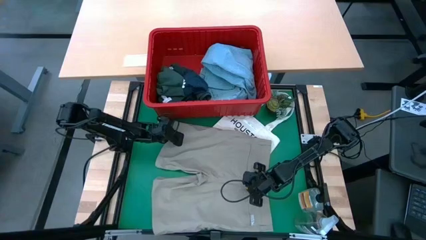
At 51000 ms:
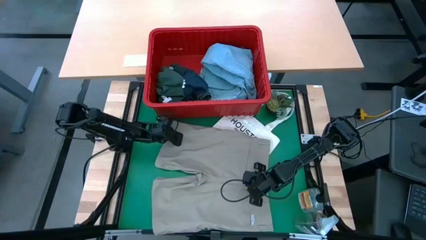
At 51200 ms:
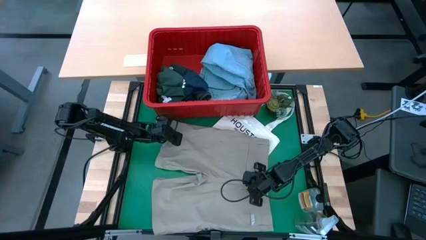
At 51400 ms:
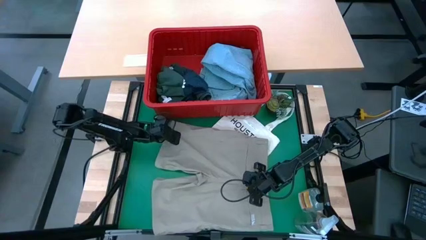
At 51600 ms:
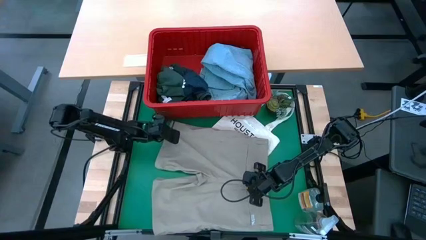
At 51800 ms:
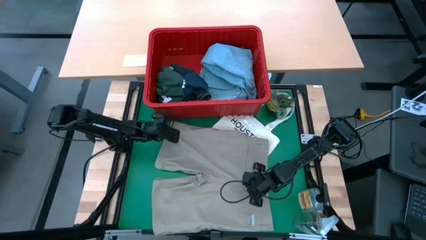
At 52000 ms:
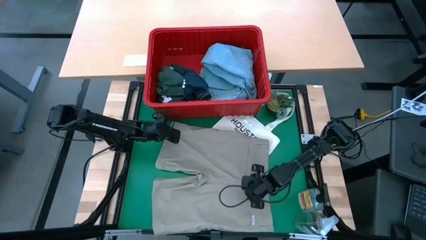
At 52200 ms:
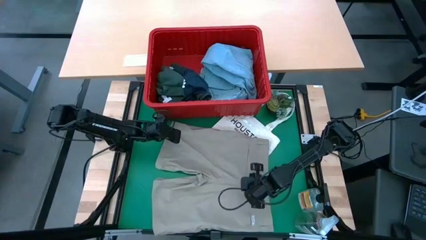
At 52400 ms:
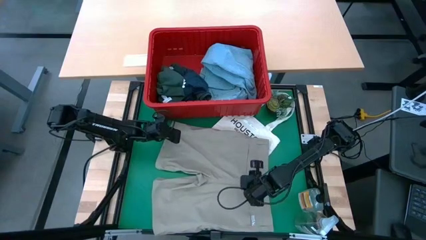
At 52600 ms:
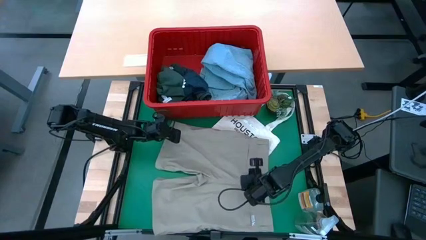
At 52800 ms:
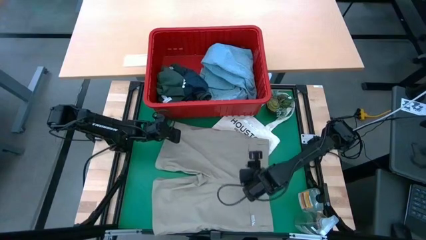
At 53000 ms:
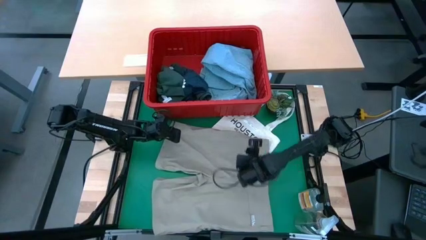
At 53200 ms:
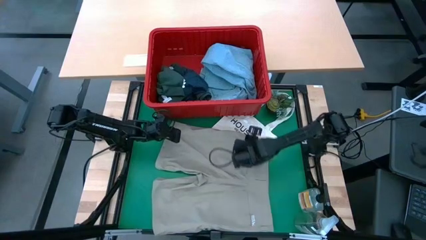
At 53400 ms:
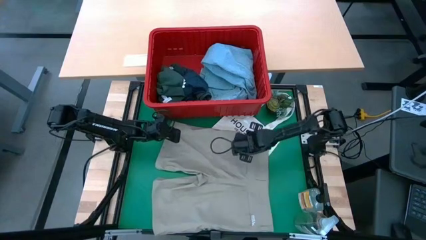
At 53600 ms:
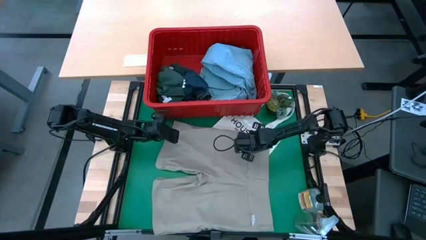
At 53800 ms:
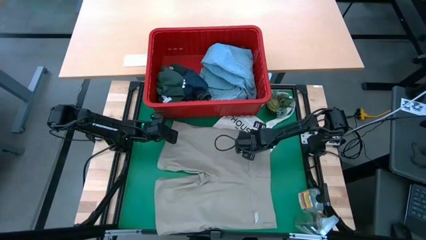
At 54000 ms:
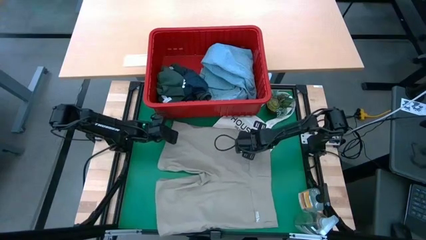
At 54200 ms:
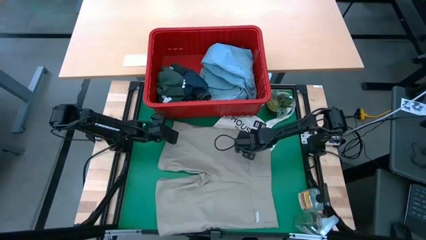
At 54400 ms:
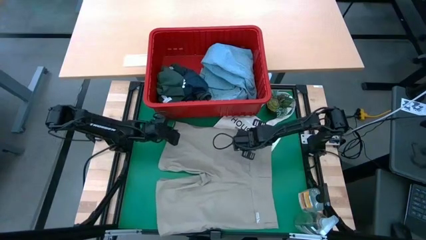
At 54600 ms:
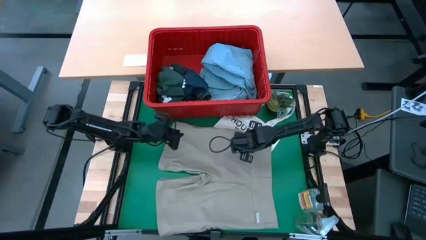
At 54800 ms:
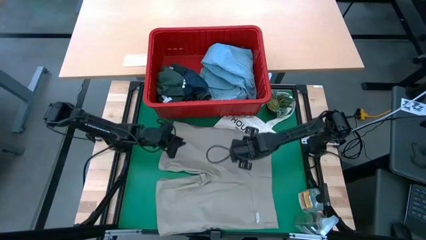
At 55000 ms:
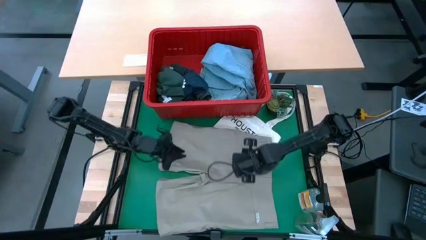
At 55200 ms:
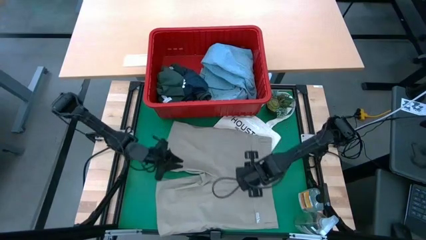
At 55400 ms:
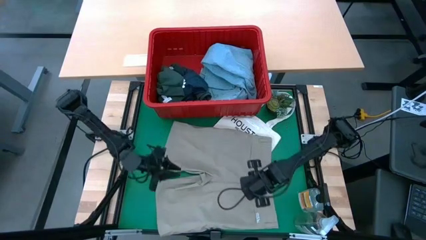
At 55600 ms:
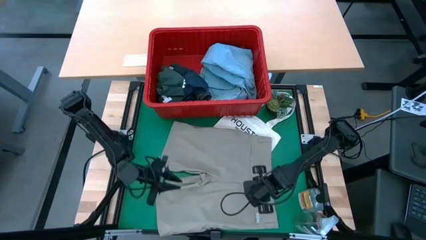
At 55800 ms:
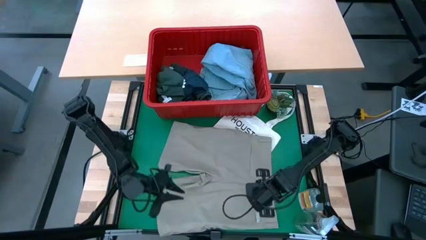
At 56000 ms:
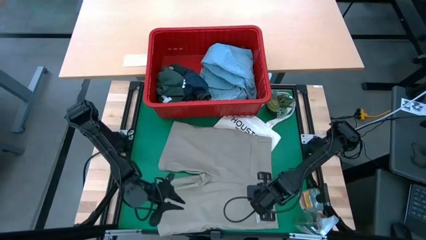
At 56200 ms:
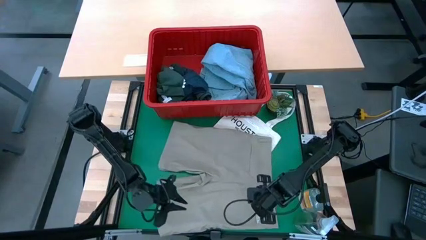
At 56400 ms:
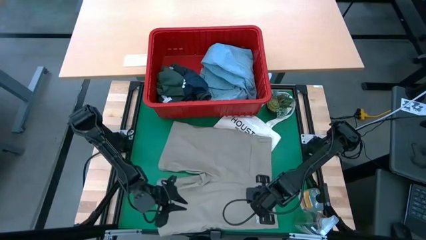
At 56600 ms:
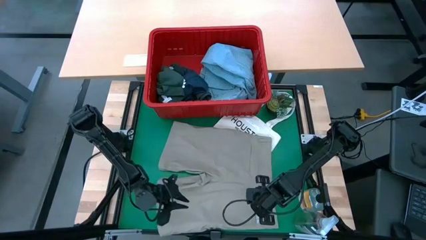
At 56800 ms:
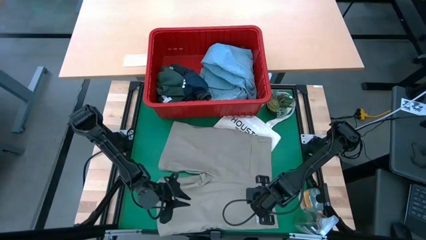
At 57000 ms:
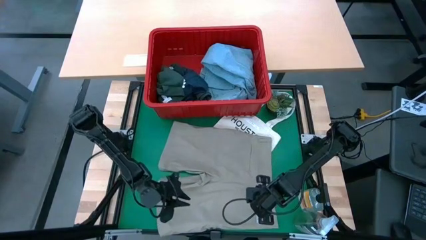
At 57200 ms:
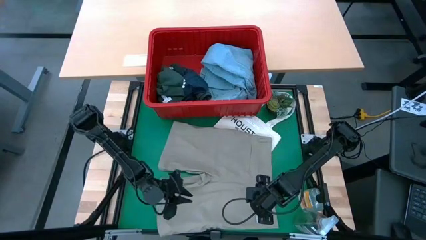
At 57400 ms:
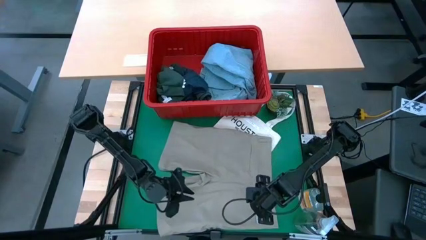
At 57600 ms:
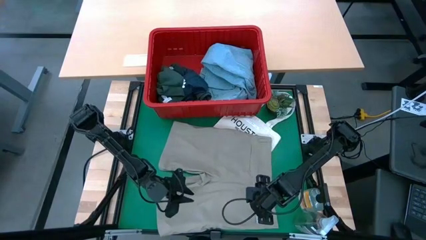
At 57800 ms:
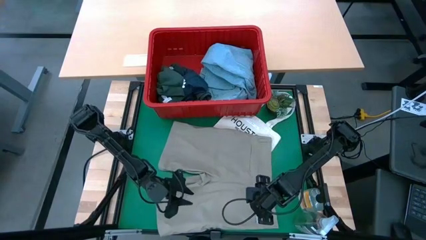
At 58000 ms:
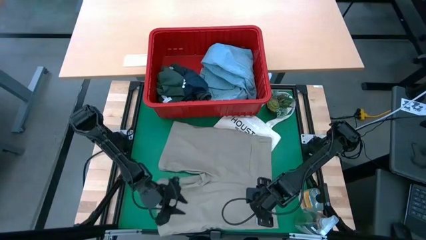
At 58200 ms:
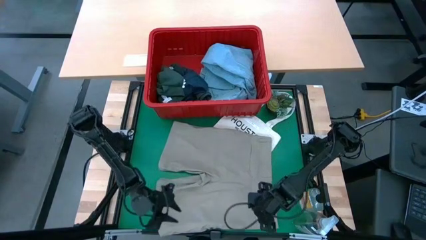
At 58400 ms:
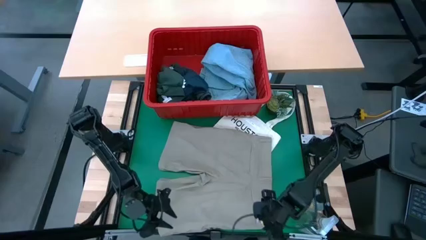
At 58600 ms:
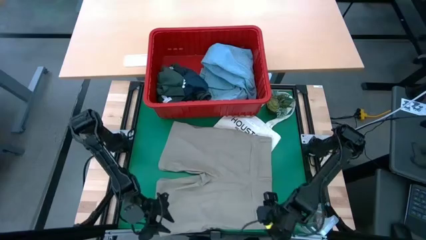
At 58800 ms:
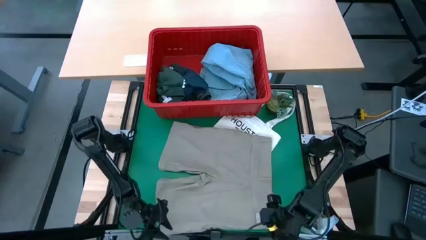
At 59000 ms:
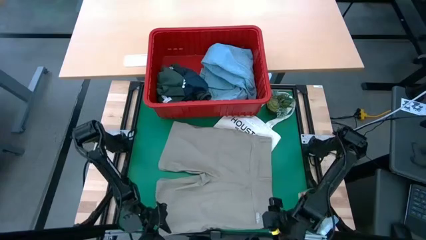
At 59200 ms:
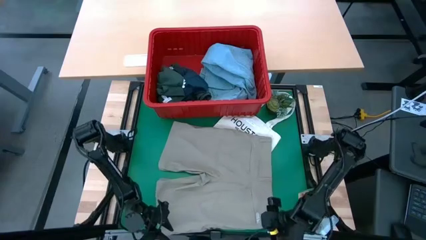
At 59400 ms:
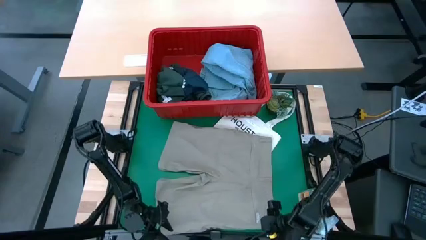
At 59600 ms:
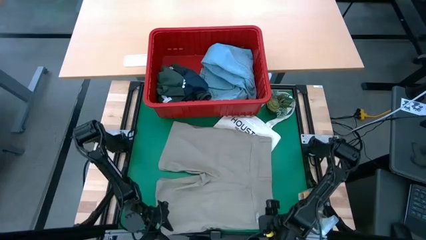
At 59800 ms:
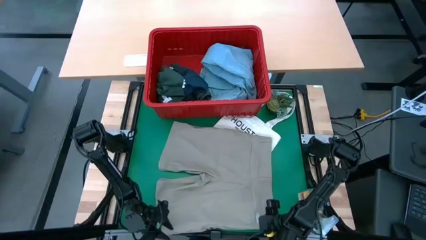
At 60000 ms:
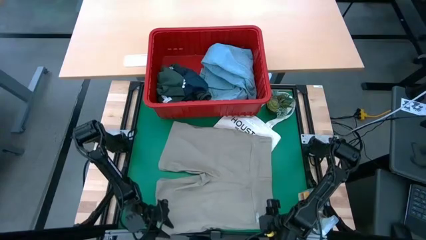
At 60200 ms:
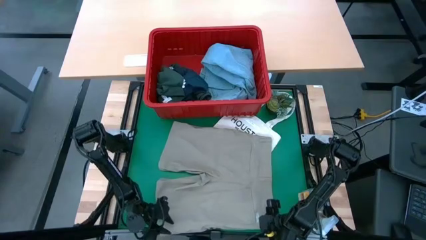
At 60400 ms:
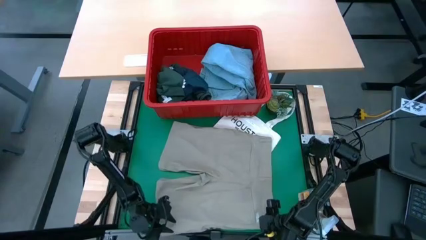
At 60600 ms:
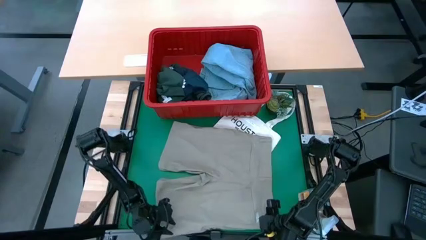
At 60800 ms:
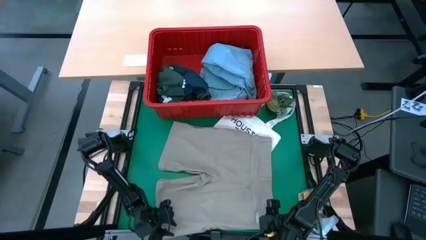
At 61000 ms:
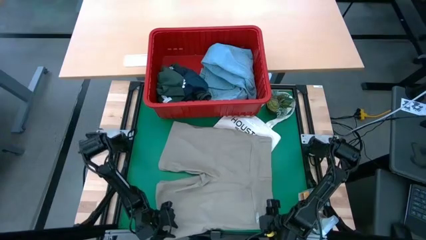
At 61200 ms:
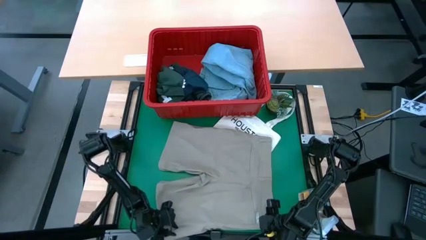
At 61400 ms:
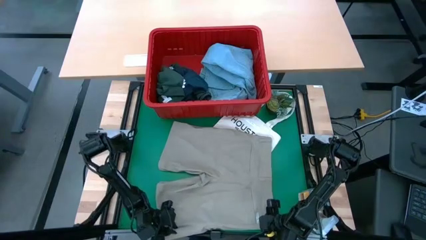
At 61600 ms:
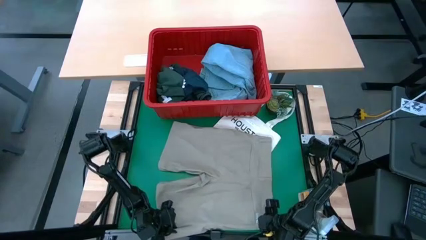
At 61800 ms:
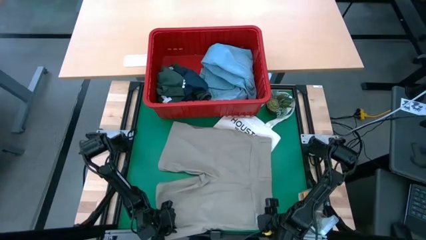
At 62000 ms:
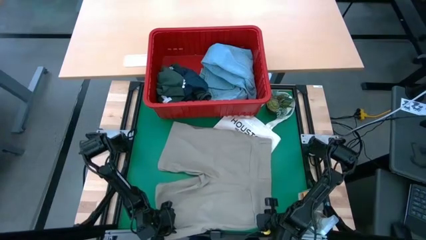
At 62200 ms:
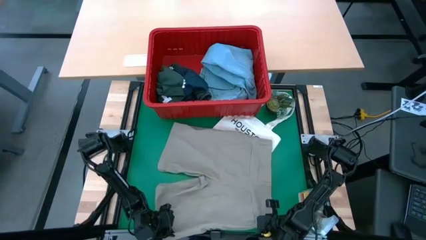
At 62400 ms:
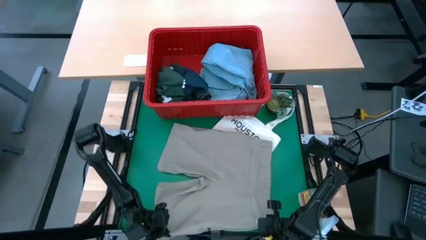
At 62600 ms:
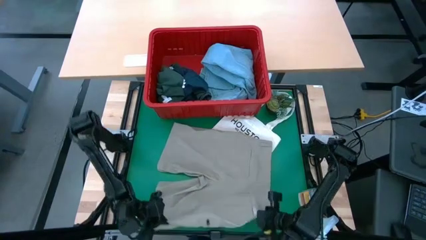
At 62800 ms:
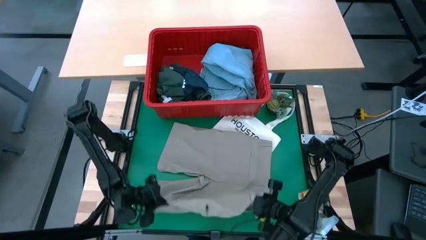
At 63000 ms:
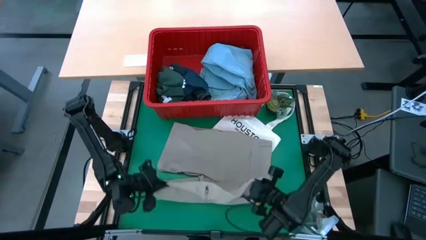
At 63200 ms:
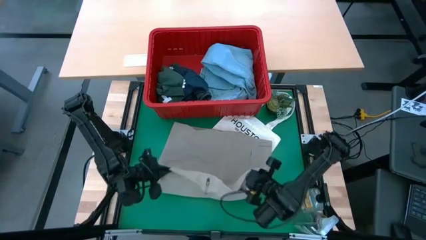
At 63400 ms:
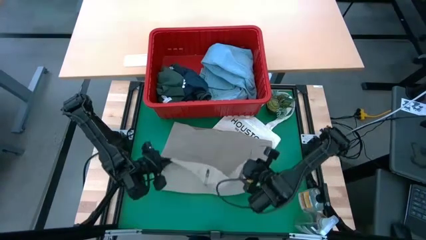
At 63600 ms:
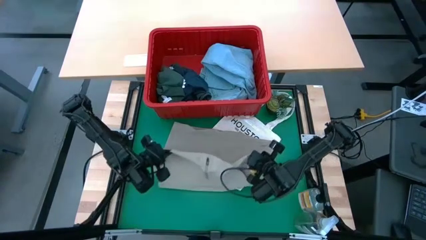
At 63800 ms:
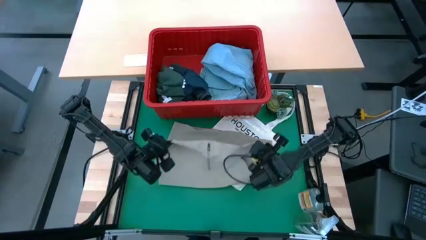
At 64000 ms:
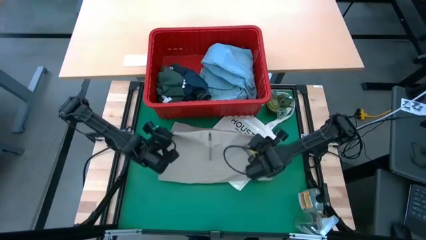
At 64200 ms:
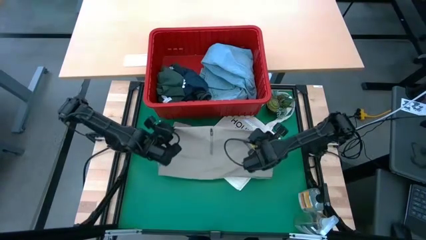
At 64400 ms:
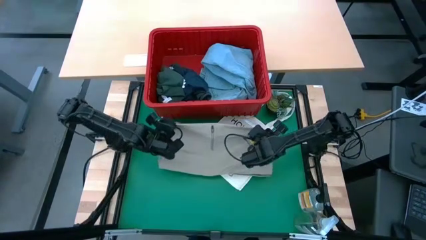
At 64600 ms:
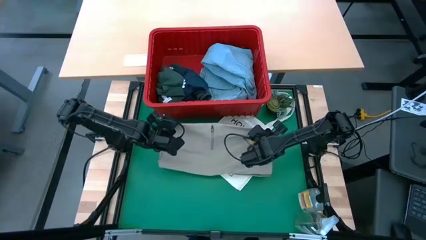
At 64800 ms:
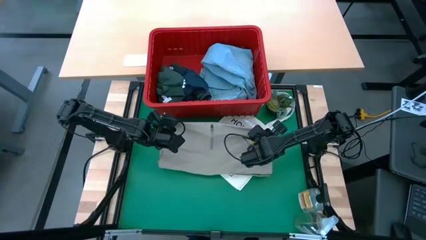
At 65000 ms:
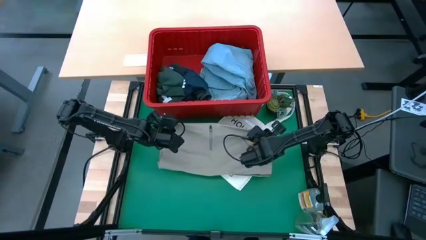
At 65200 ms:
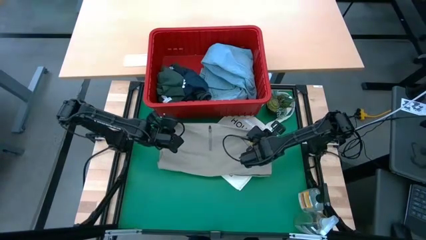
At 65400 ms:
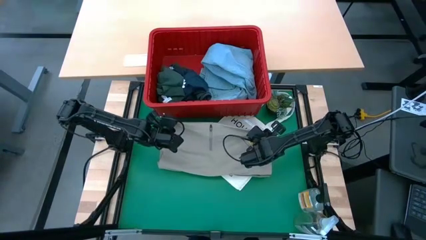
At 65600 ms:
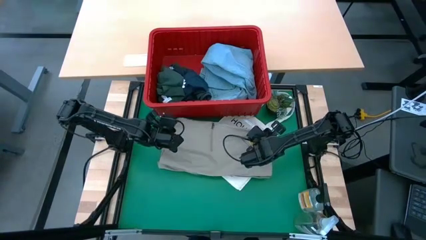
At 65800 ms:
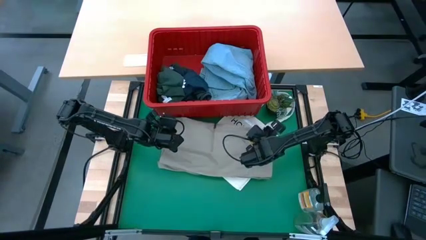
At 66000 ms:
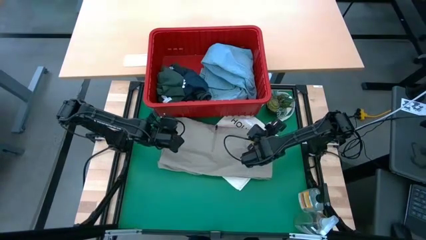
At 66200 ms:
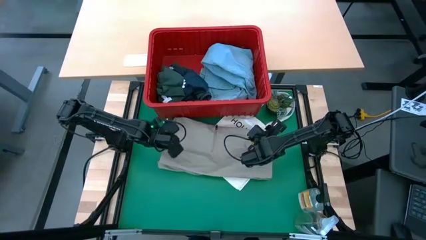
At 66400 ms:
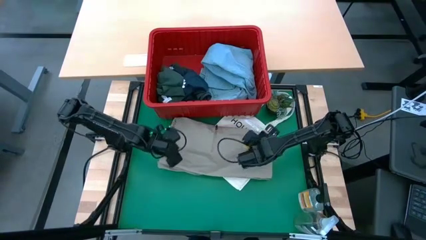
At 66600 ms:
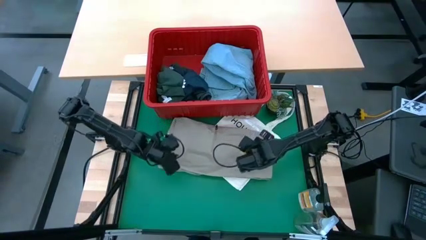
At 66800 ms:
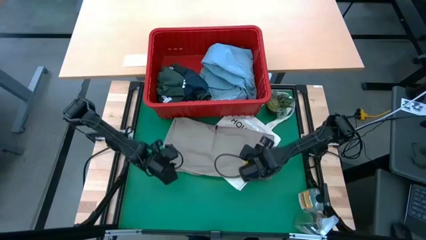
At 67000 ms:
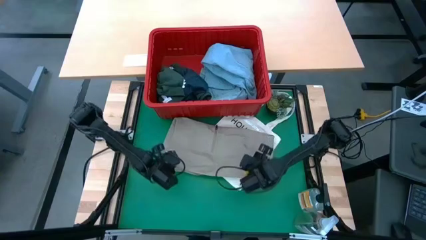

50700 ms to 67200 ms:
Task: Fold Laundry from Bin
Fold the brown shorts
